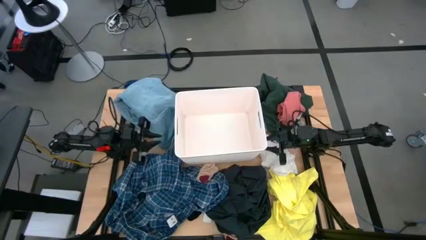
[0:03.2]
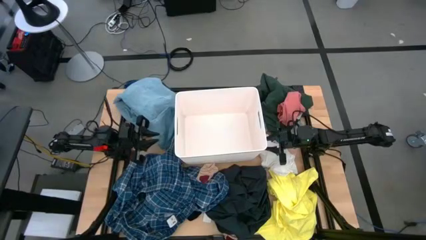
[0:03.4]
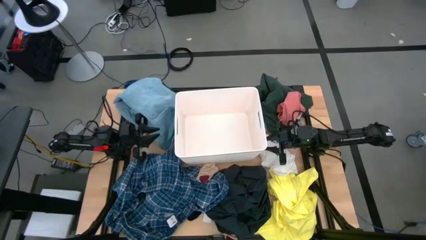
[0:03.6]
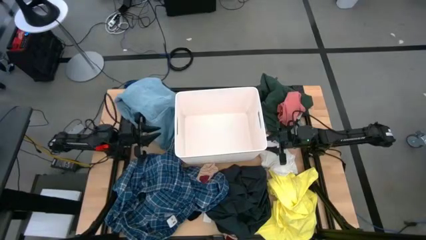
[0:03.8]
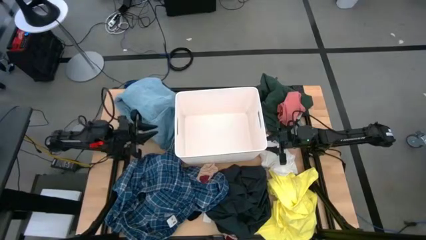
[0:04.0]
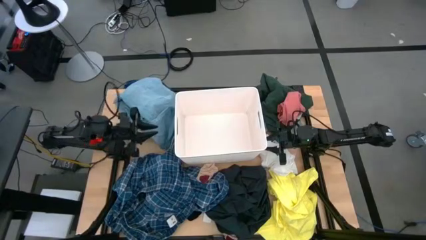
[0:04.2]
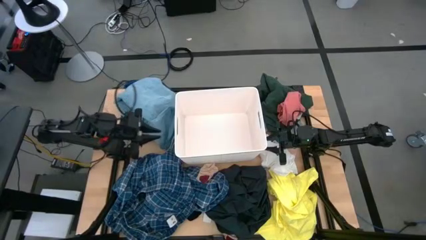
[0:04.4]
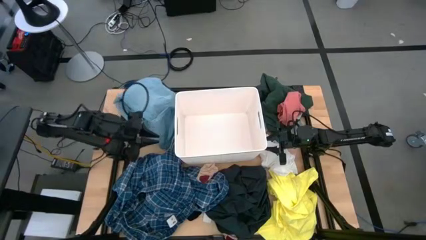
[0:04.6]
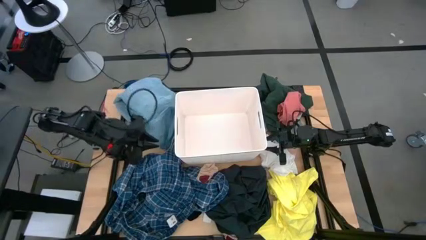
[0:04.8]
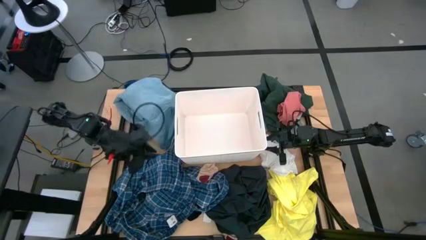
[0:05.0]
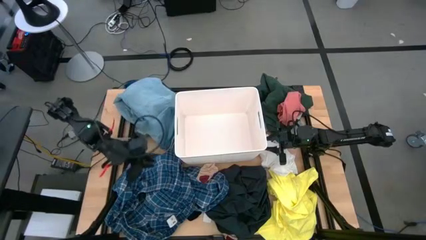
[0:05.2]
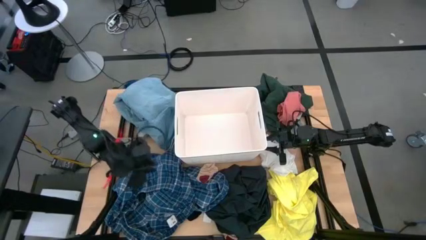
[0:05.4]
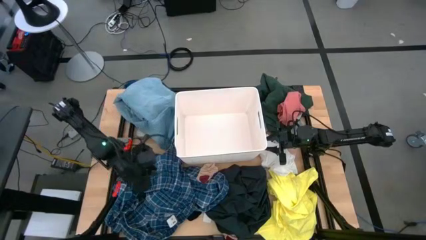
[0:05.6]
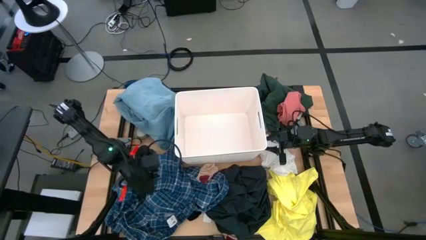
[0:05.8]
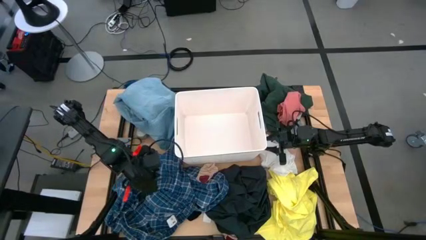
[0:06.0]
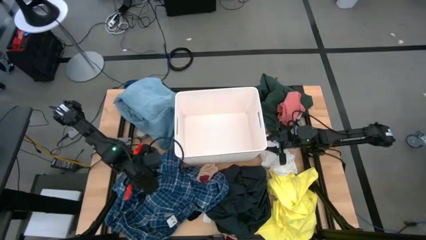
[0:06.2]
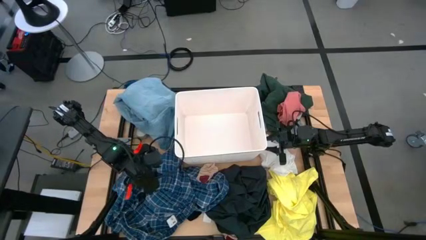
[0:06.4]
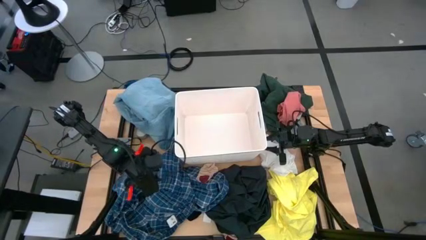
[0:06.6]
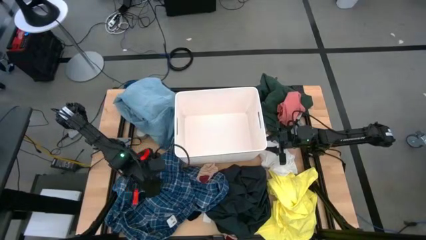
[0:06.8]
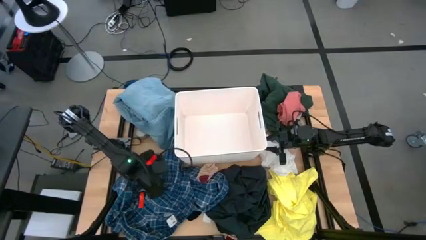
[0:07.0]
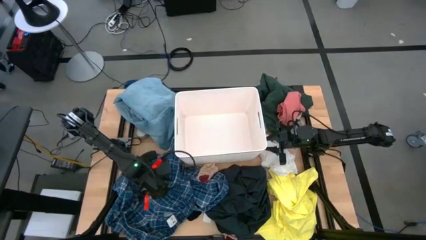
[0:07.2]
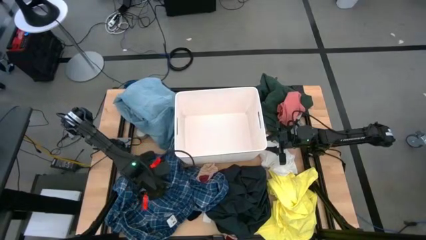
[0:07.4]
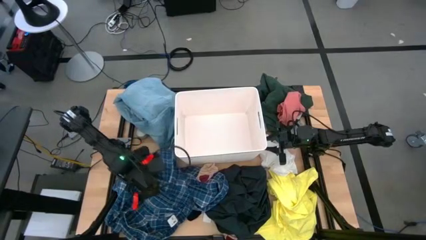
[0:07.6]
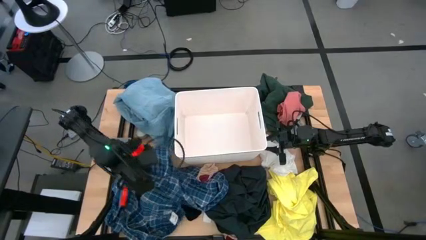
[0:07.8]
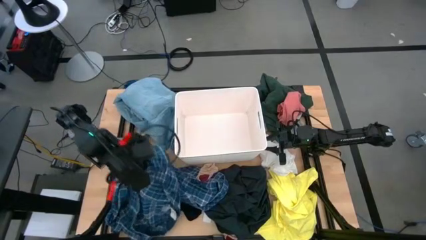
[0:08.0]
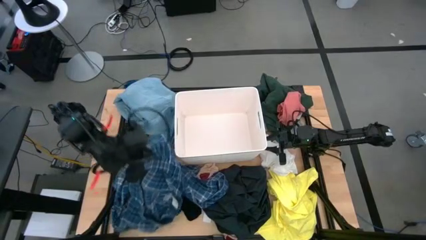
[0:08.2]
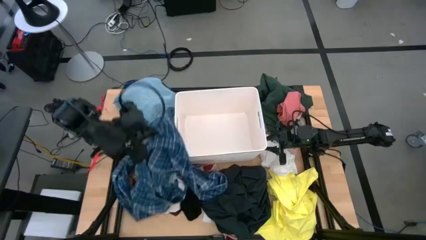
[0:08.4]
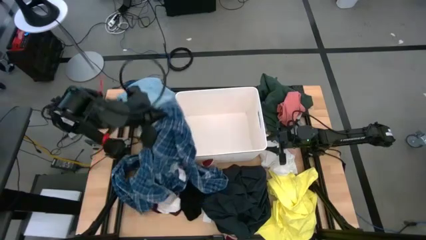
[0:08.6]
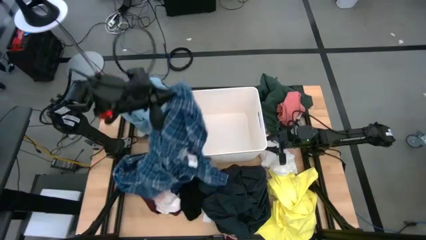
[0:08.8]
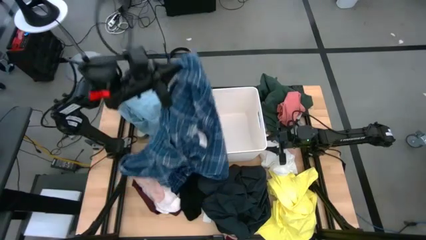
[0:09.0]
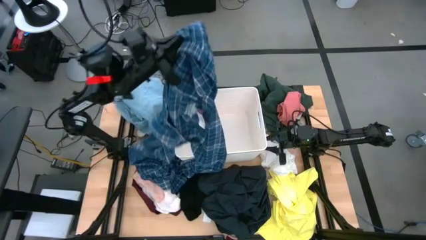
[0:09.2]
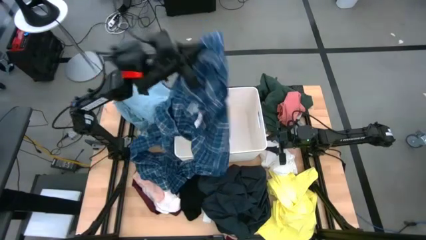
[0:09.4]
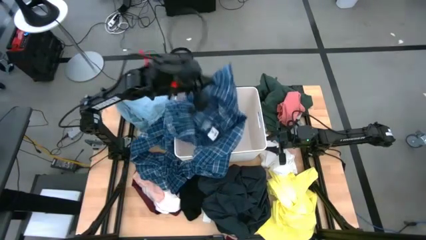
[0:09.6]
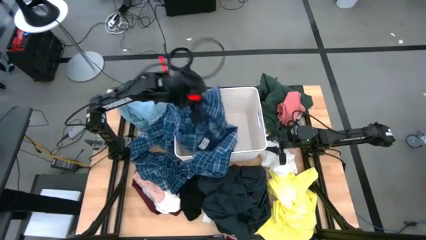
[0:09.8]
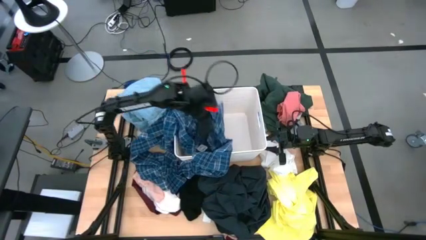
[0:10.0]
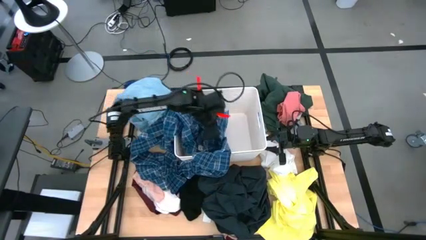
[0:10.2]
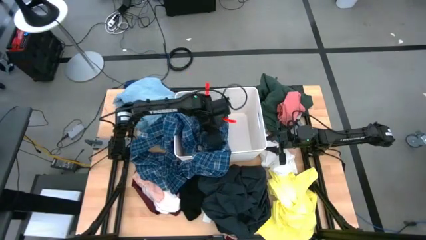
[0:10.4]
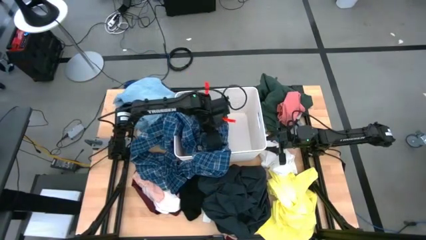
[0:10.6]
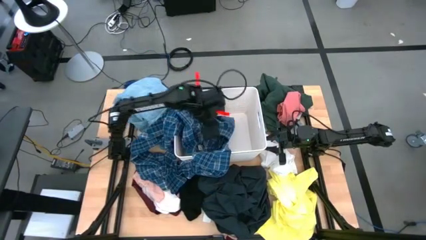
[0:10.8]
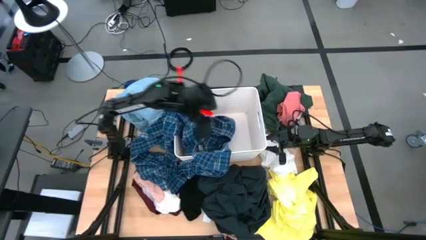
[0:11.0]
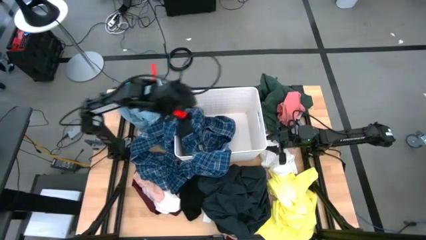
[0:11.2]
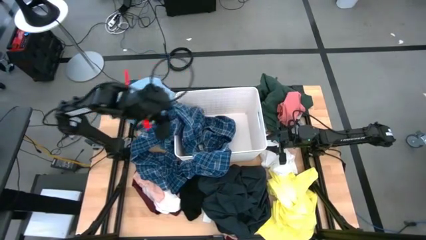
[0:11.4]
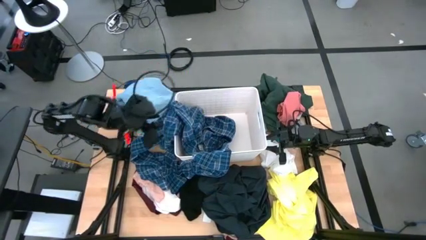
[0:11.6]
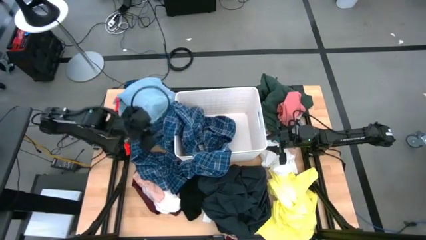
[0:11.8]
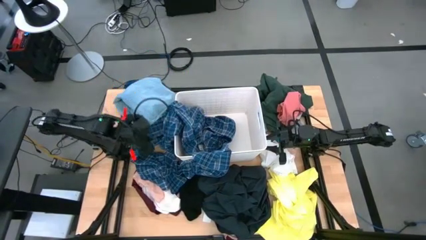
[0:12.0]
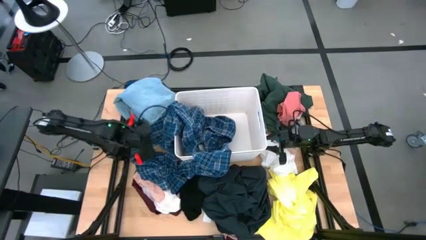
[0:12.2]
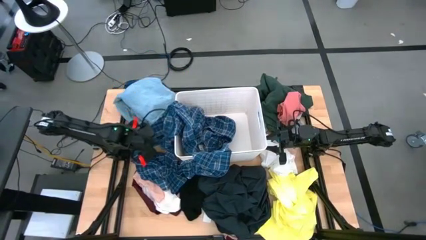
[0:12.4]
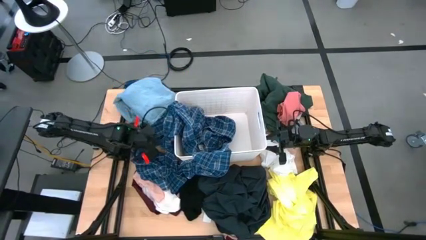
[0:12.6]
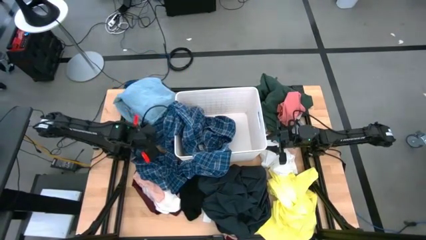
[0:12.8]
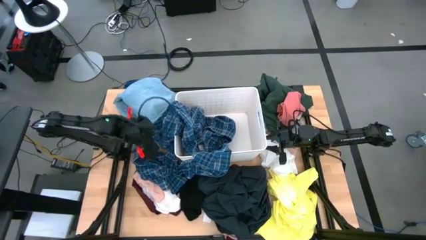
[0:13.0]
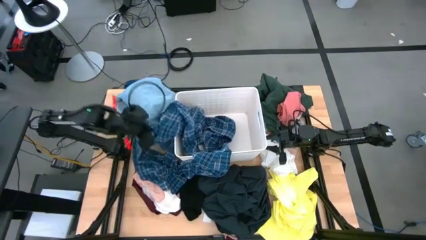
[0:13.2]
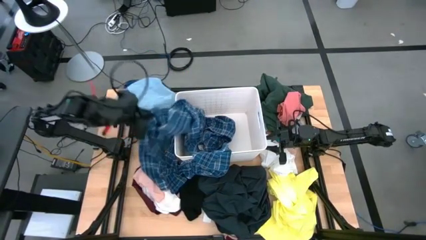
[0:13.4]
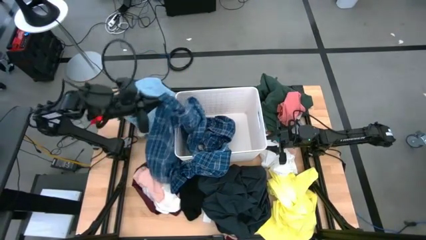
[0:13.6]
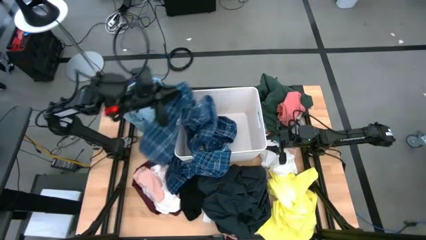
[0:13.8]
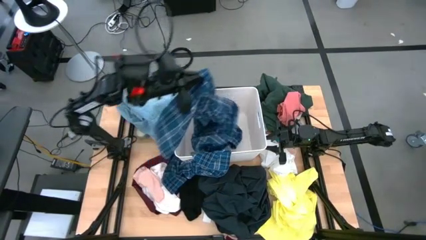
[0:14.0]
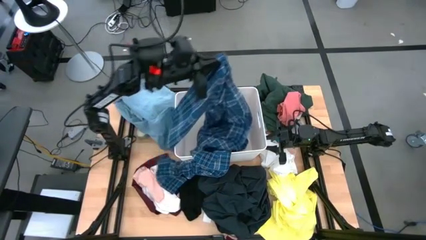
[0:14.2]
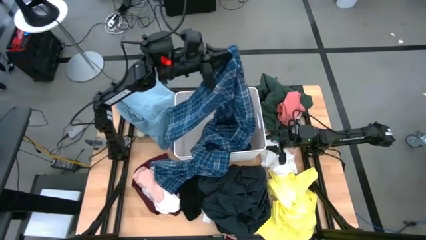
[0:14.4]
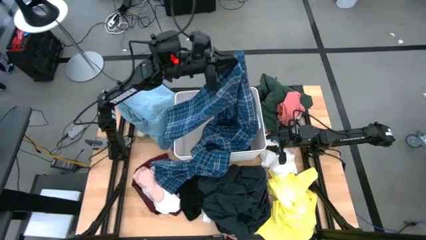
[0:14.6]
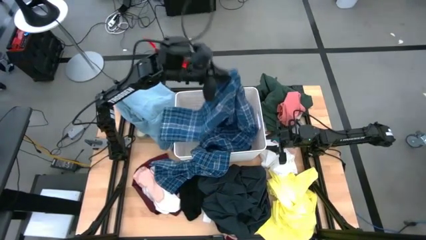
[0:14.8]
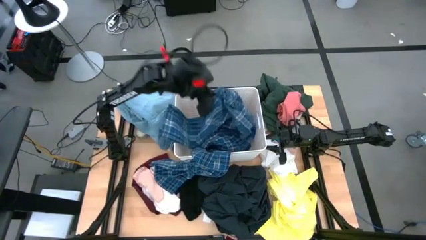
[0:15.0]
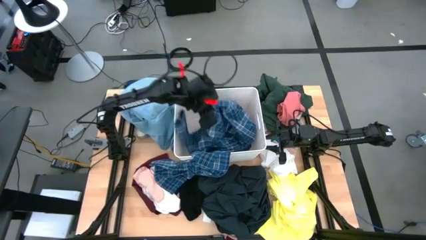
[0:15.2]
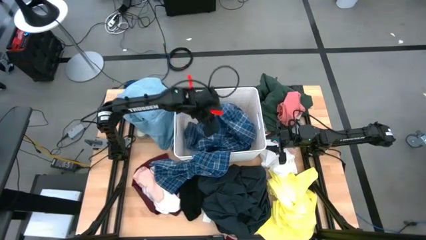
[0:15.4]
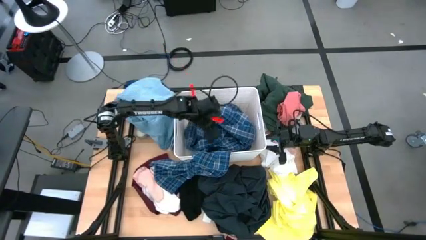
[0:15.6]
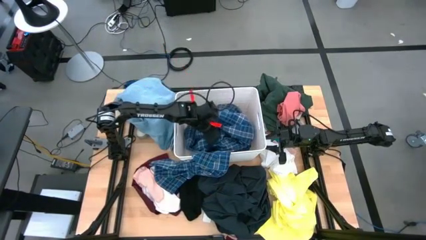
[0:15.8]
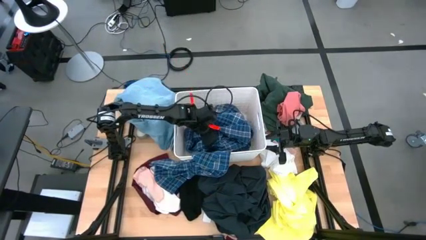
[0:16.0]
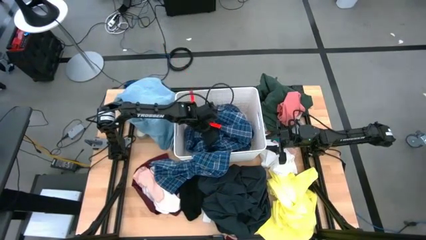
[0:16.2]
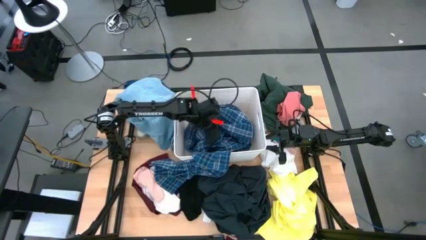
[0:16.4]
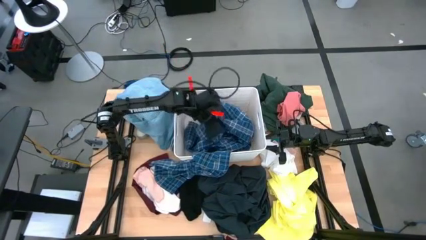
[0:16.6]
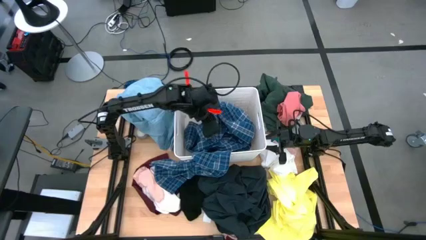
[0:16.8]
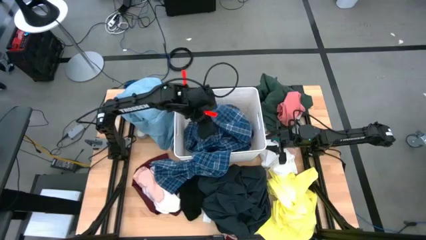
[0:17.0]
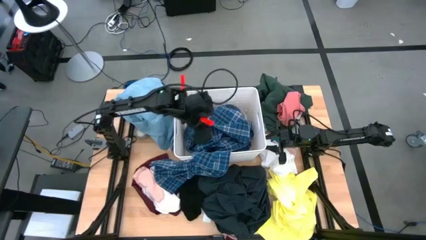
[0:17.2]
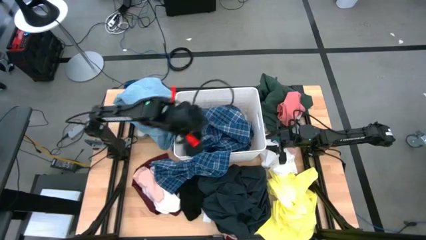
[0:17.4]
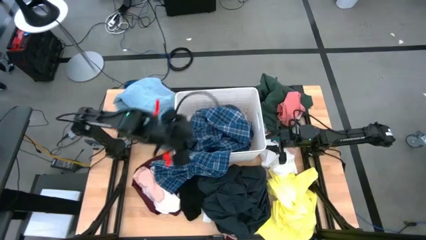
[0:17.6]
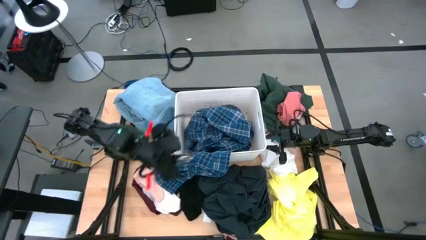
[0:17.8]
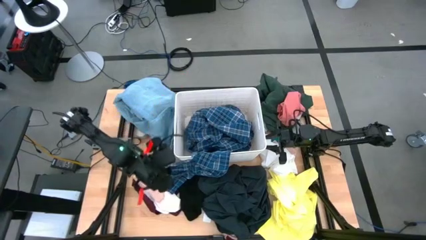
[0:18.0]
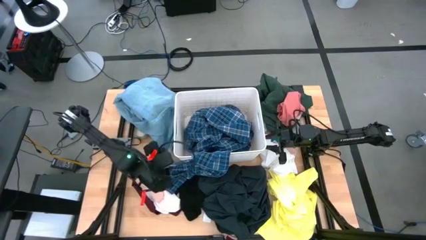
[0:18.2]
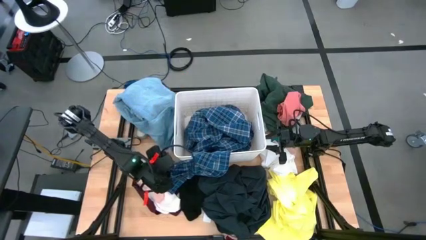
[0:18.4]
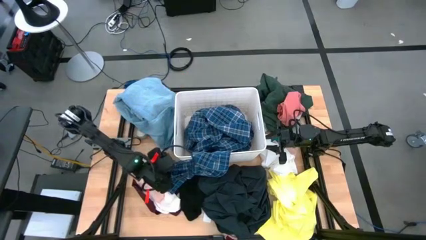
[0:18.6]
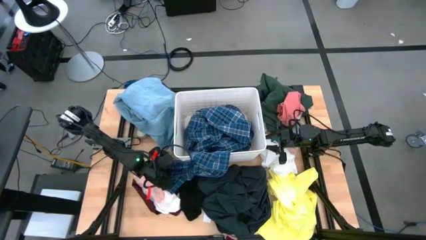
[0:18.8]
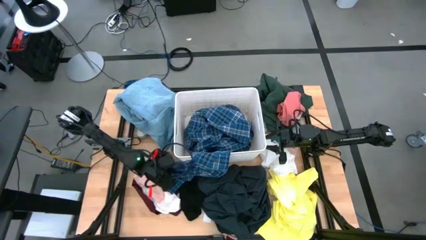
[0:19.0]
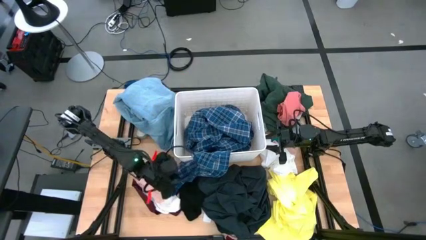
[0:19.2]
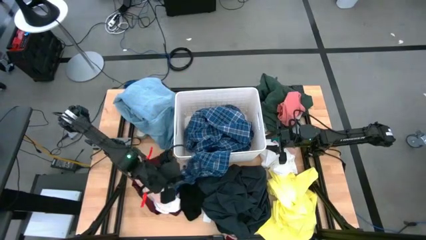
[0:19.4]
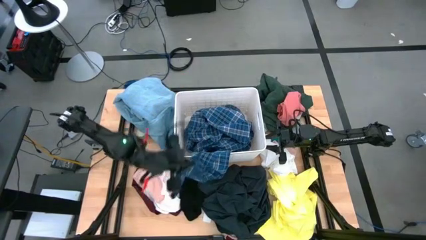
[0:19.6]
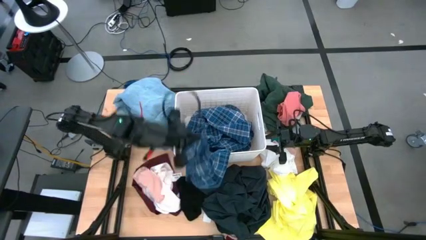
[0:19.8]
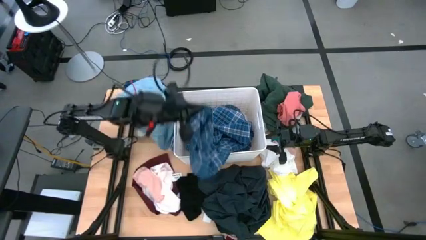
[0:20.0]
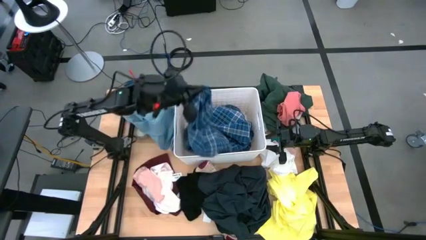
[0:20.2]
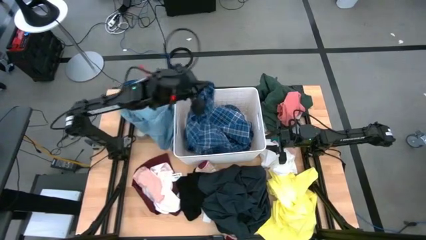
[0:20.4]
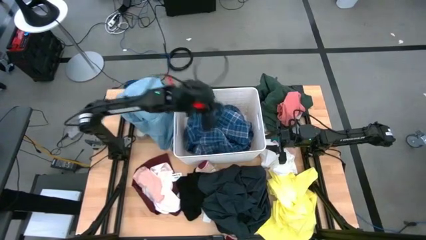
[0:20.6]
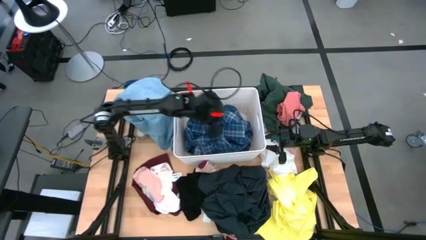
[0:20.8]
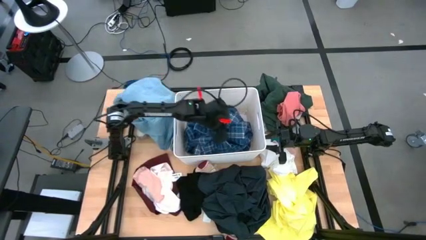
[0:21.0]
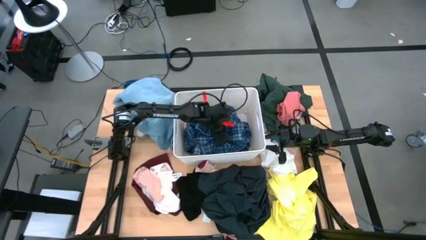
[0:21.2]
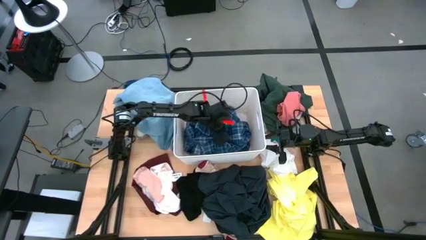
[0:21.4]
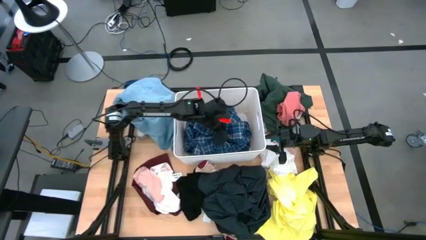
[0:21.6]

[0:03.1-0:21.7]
Task: Sort clothes
Put the blue checkered long sleeve polo into the laundry bin
